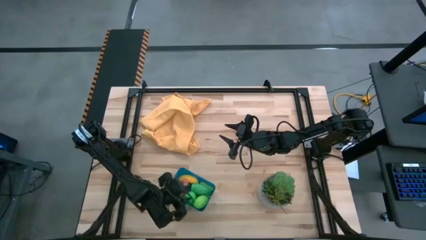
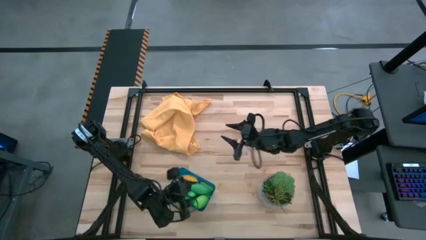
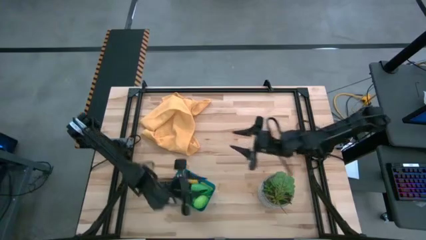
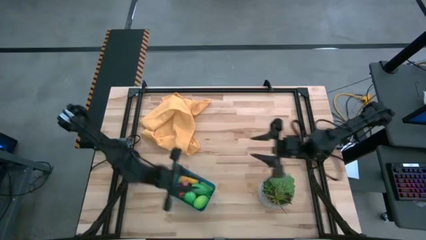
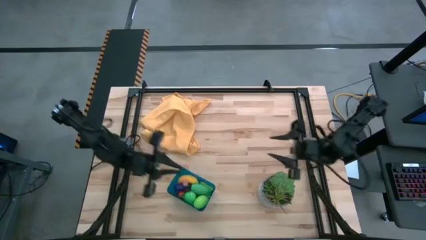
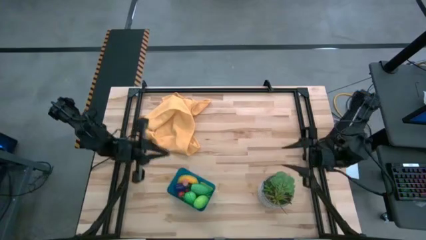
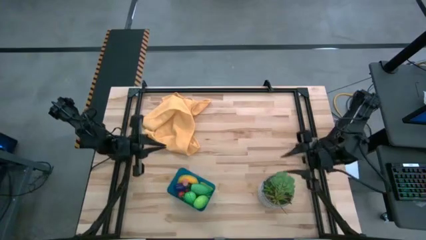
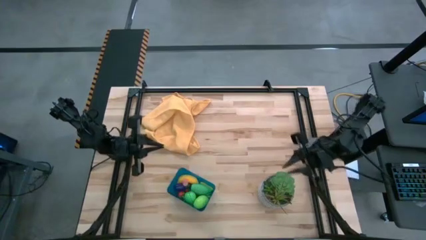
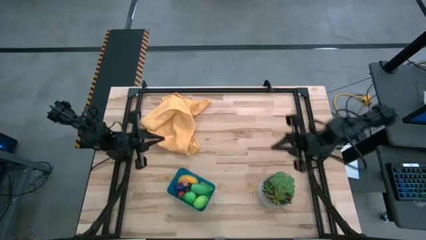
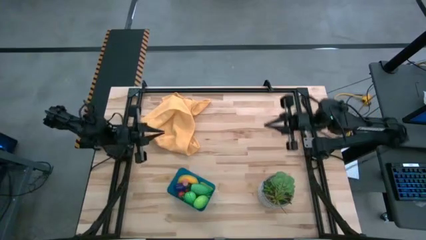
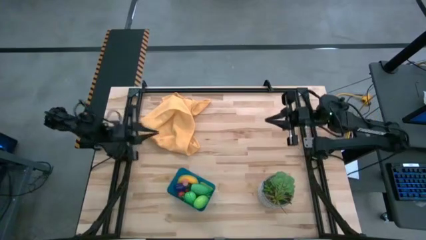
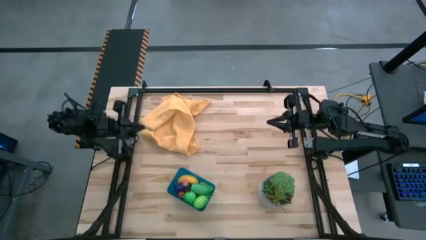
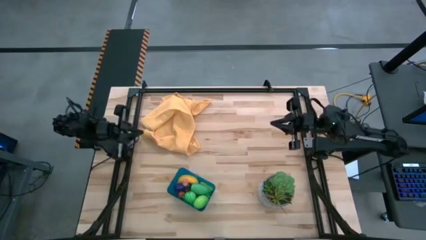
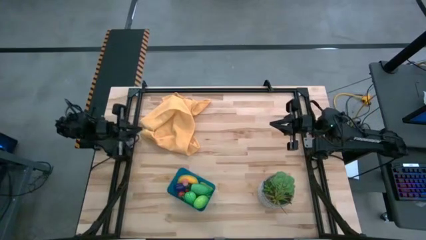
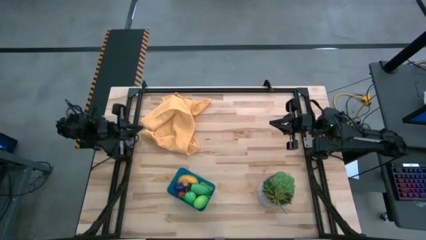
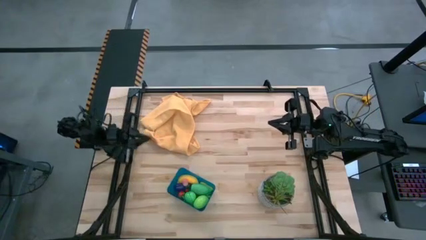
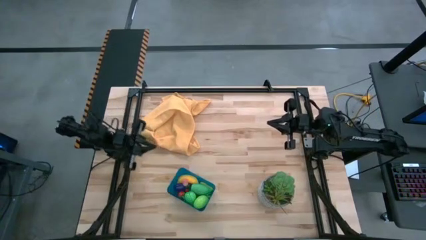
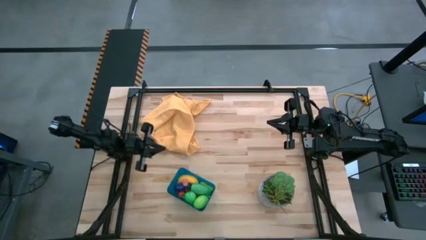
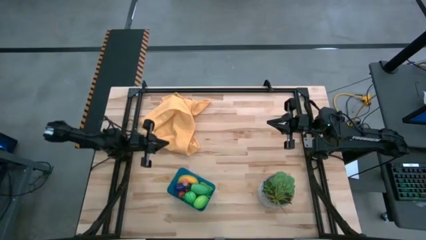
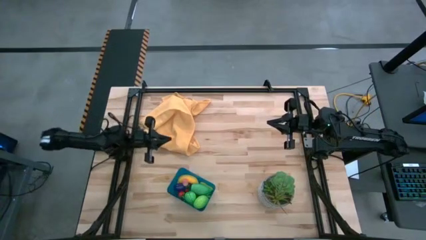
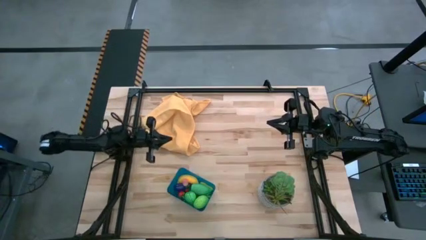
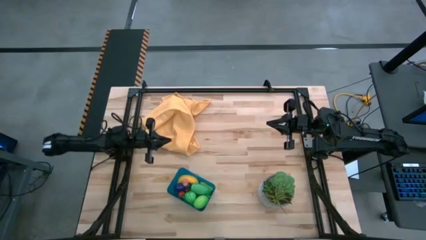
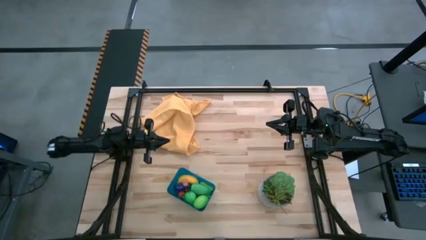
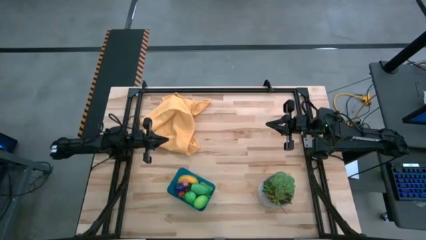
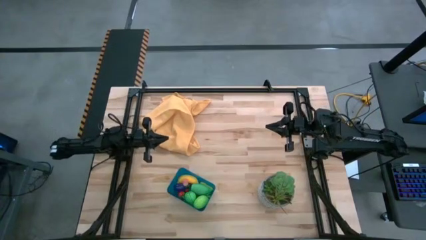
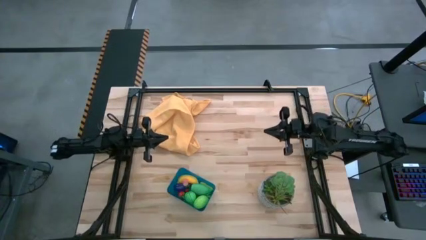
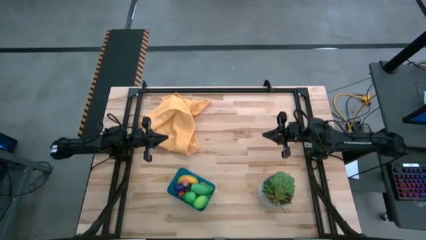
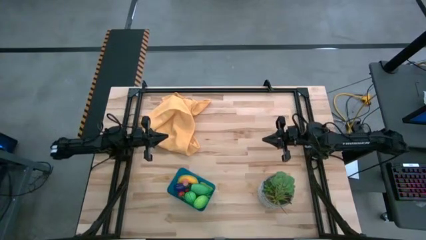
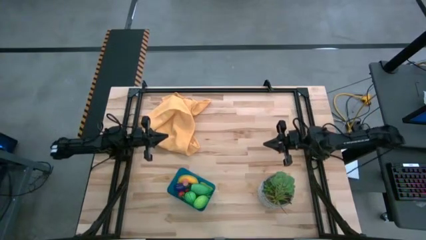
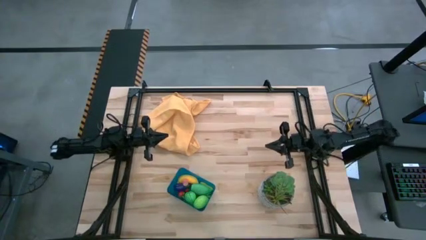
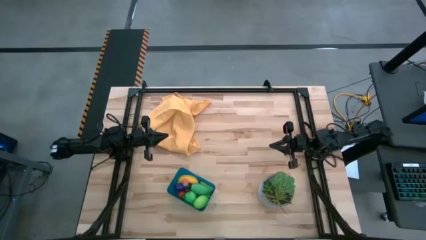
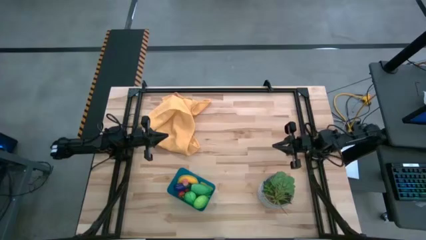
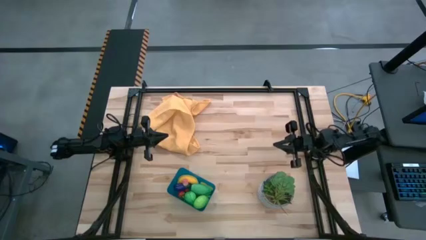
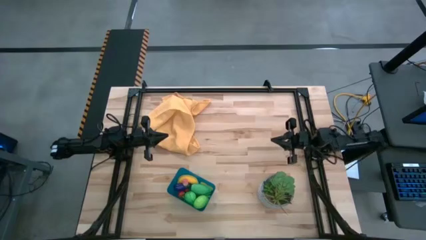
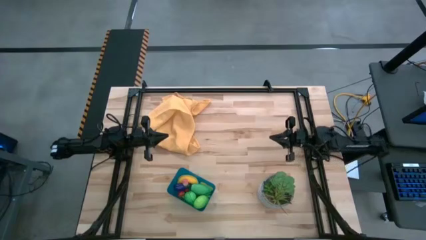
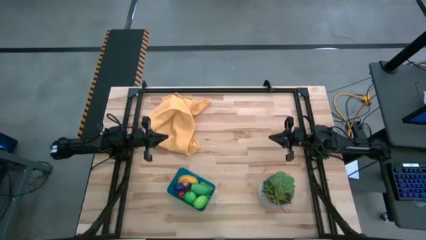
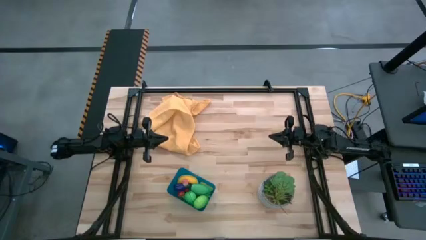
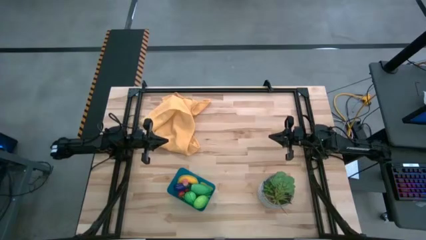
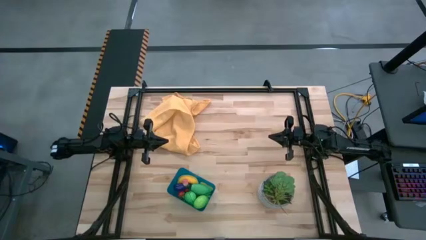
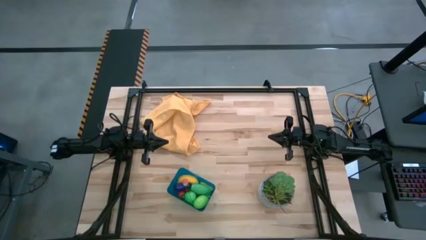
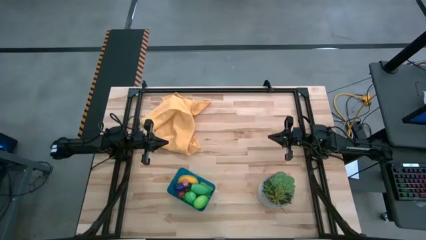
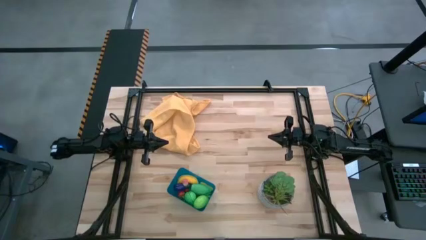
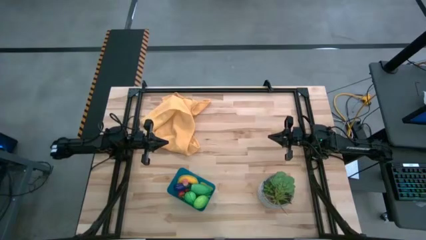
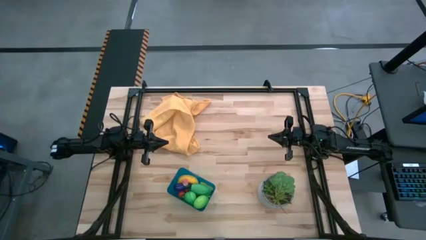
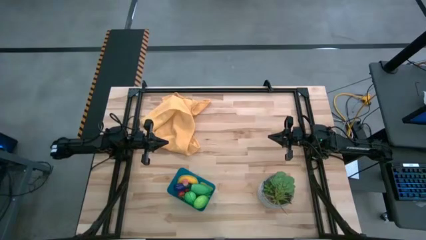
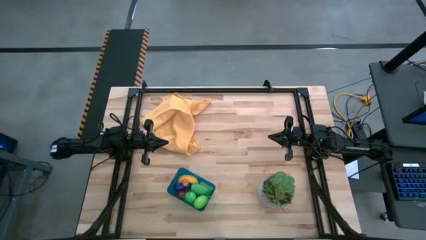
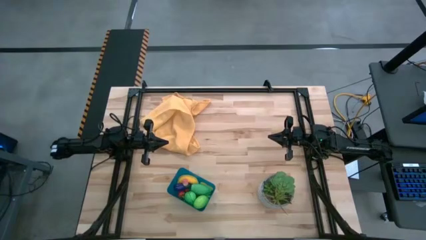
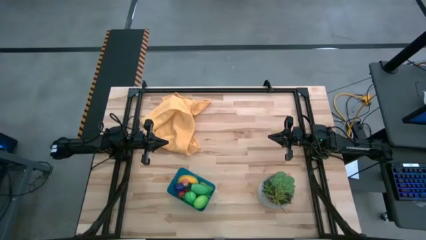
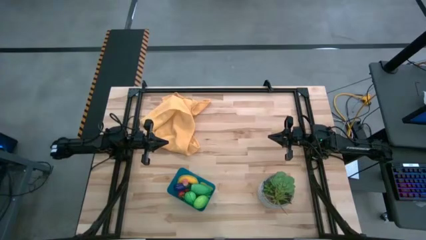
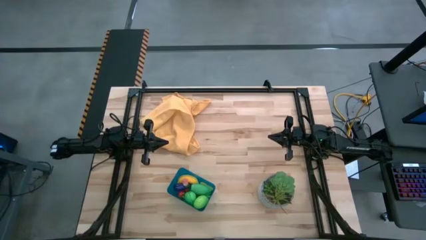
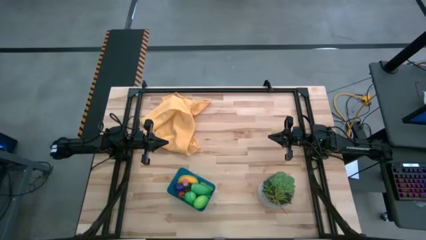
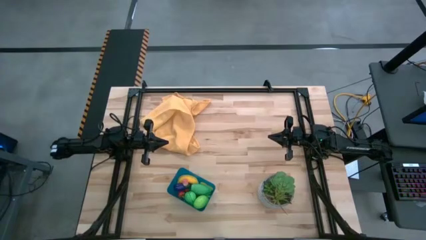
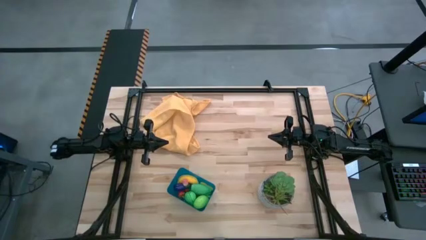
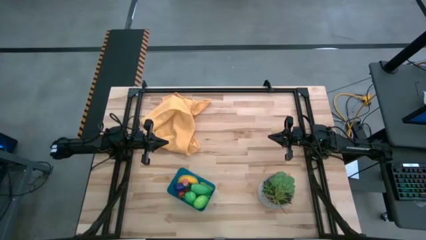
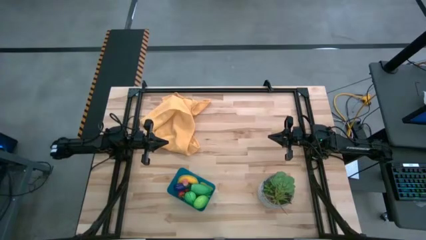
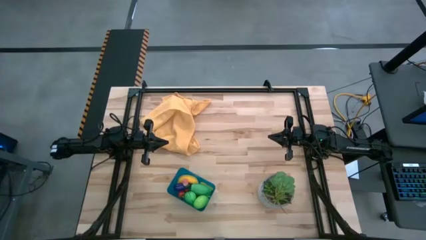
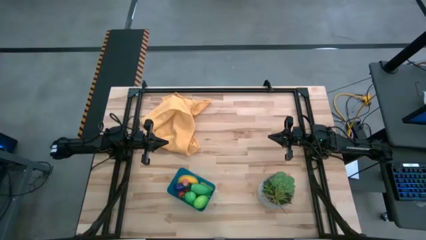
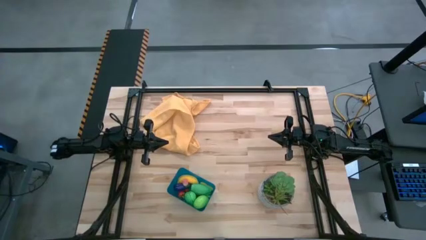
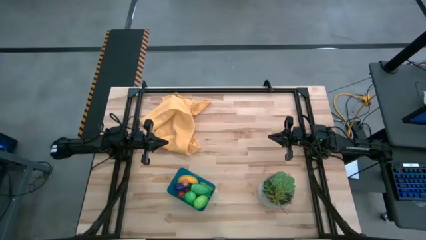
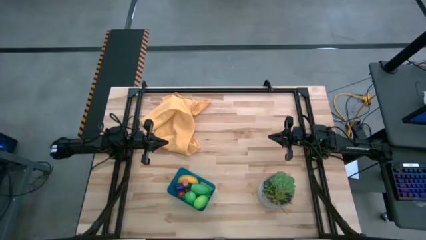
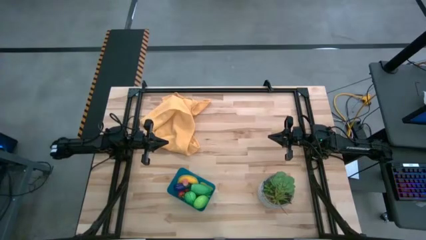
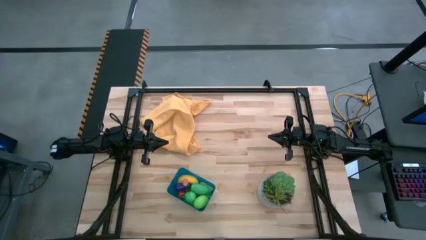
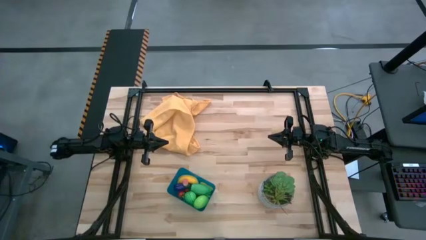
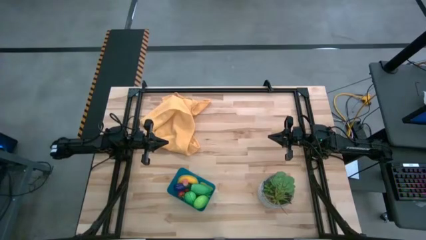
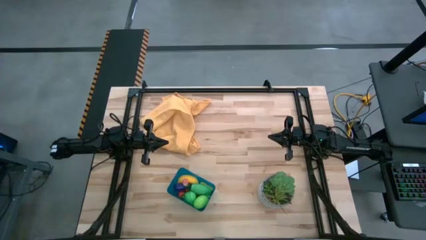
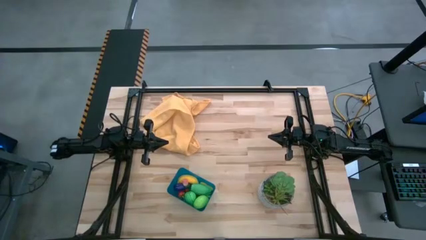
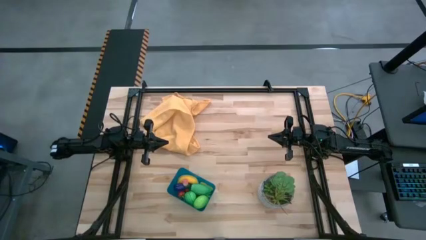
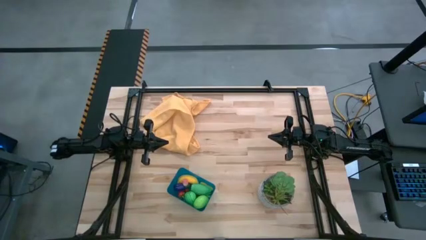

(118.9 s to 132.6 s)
Task: Pick and placing Produce into tupperware
Return to Home Position

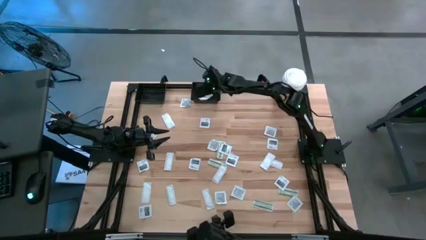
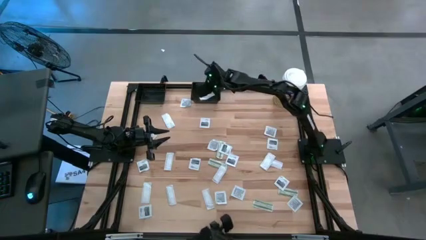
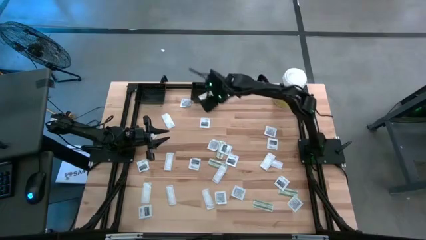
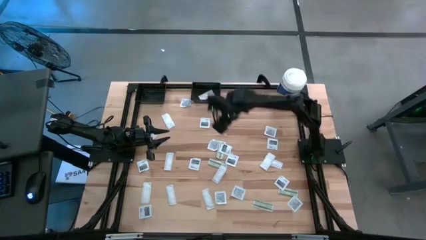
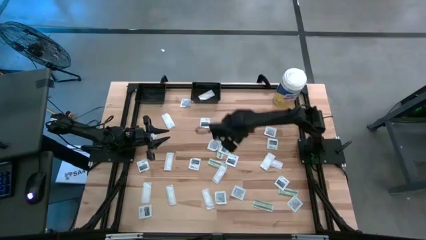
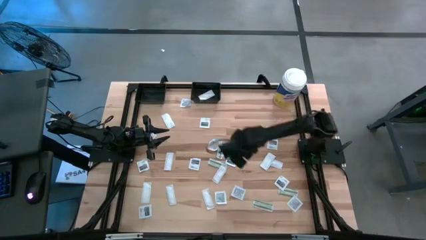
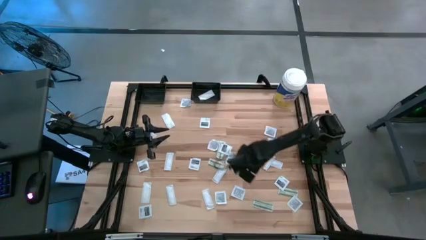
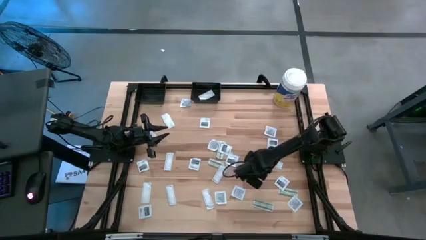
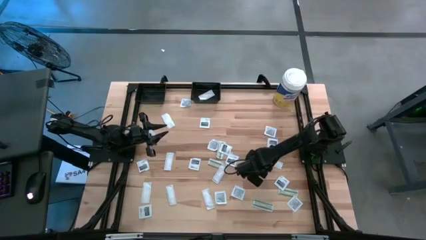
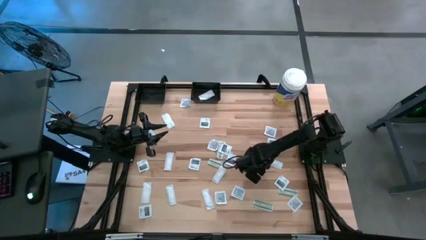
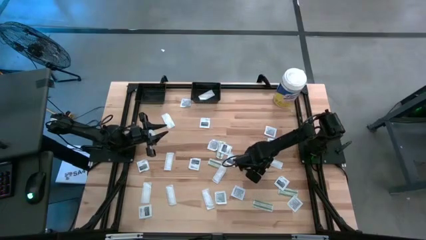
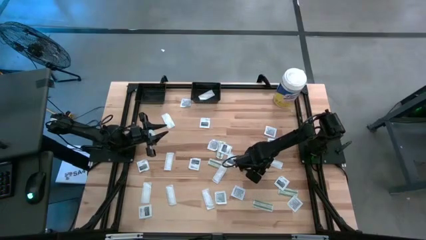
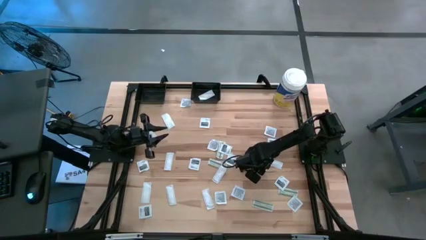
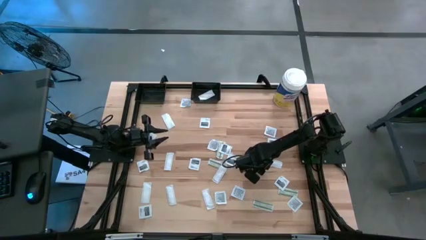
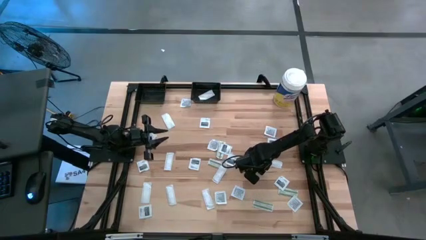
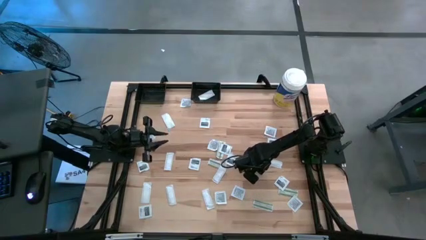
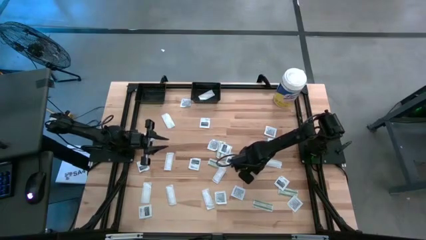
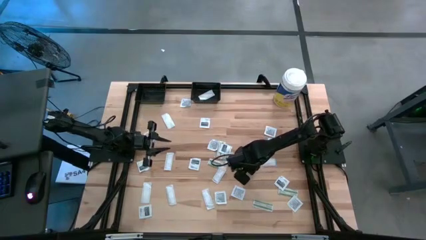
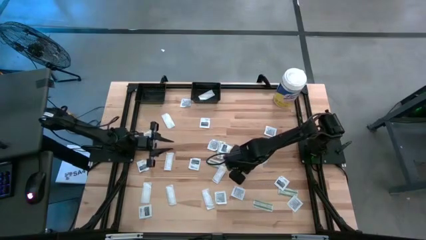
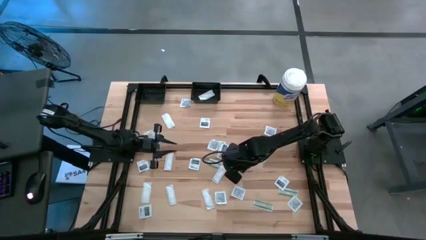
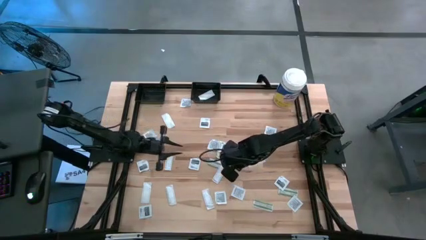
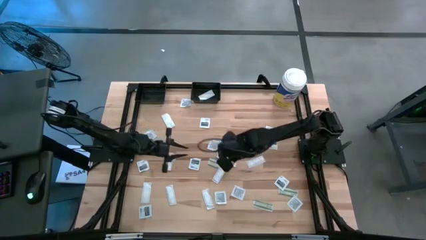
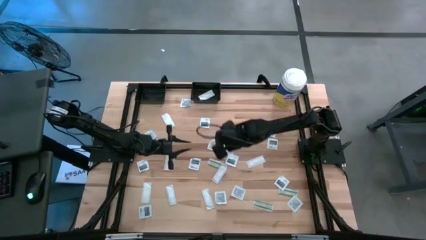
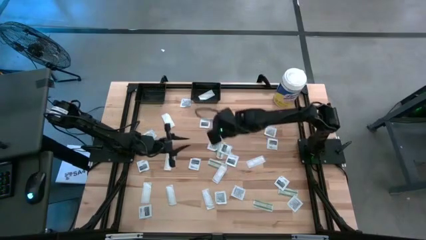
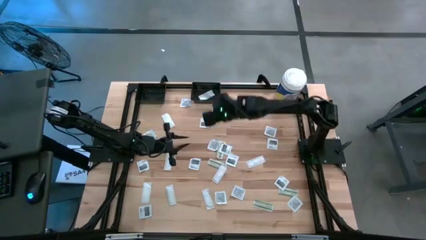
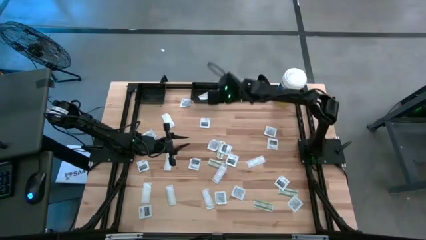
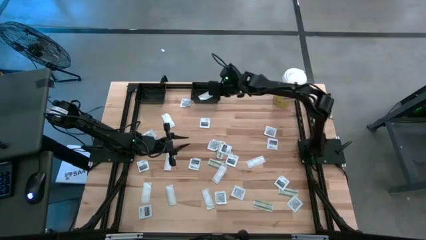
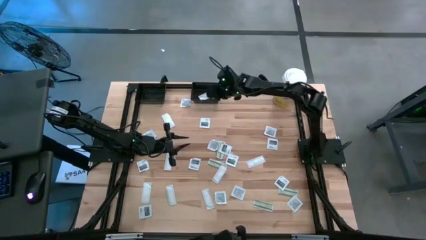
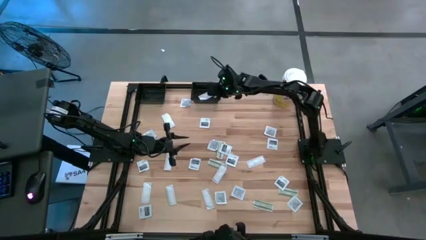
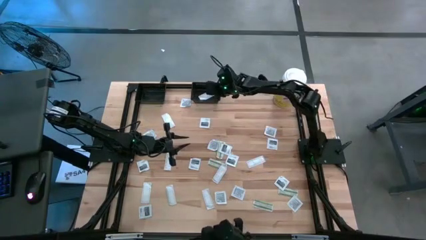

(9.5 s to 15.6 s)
Task: Pick & Place First Aid Supplies
Put the green bandage pack into the right black bin
